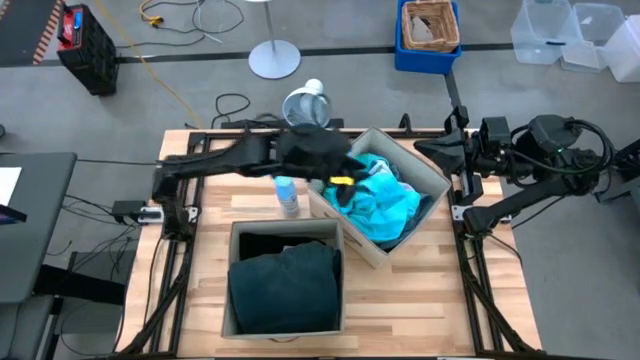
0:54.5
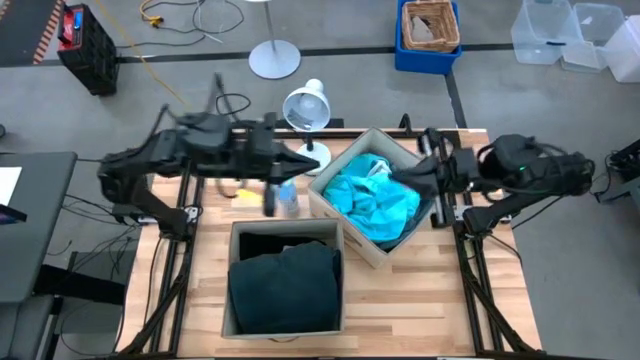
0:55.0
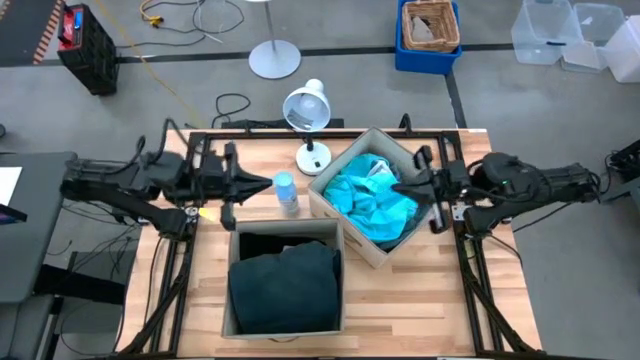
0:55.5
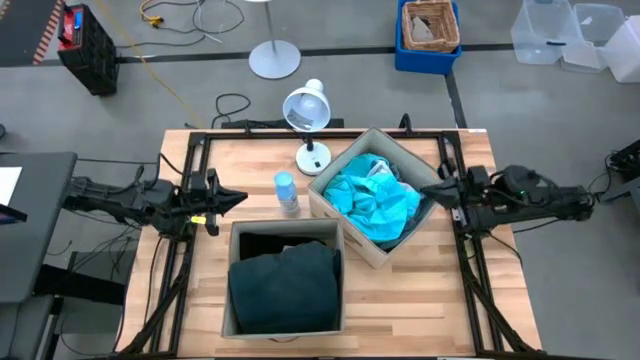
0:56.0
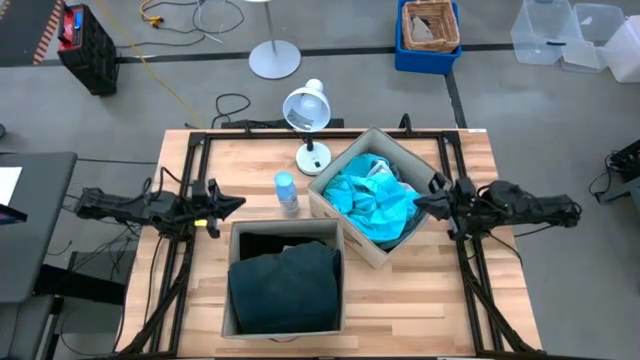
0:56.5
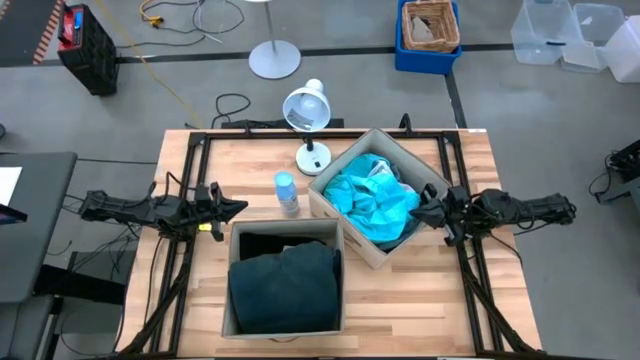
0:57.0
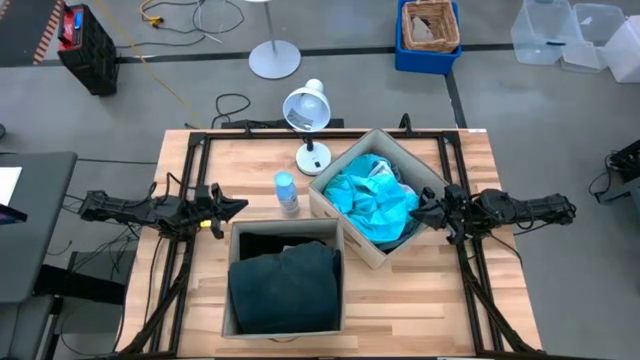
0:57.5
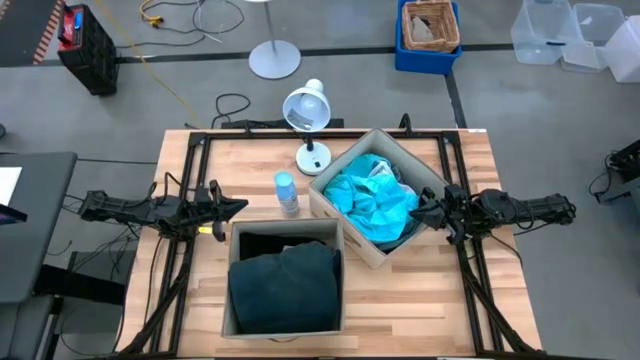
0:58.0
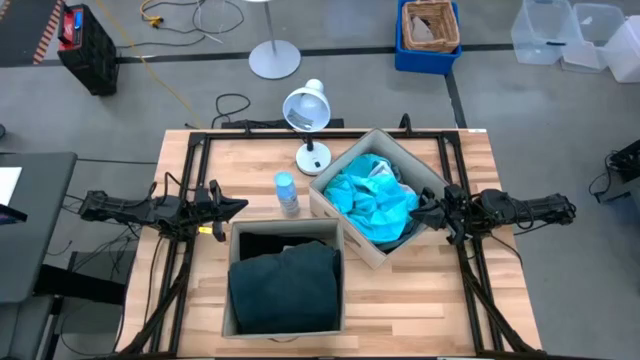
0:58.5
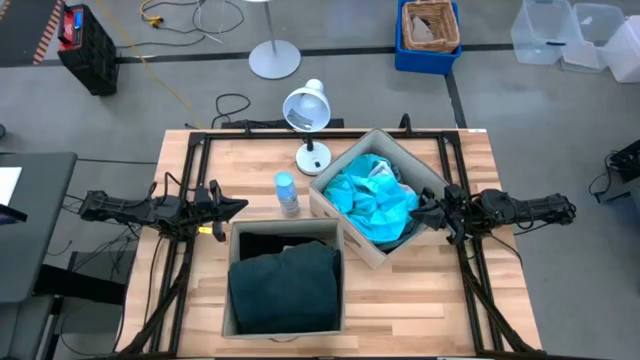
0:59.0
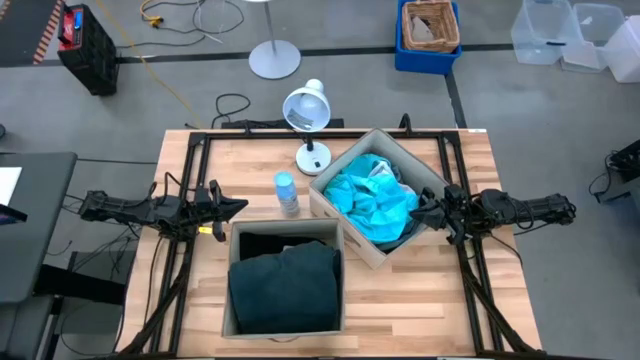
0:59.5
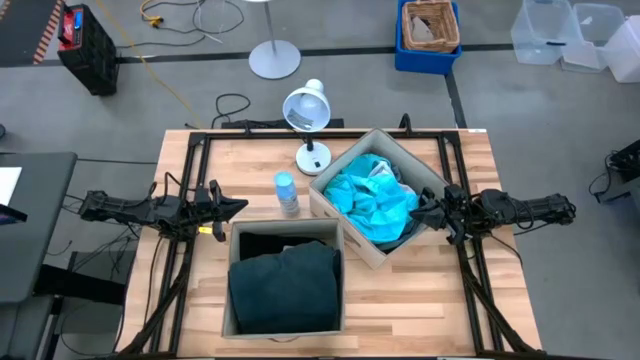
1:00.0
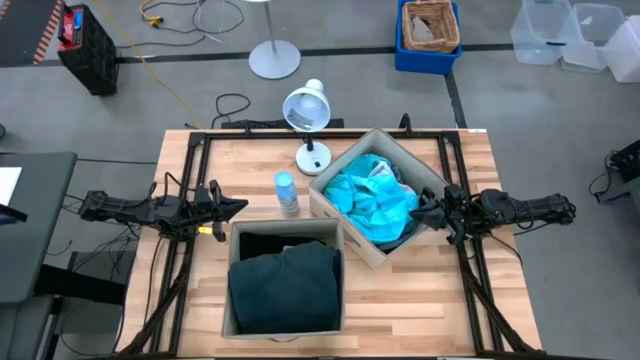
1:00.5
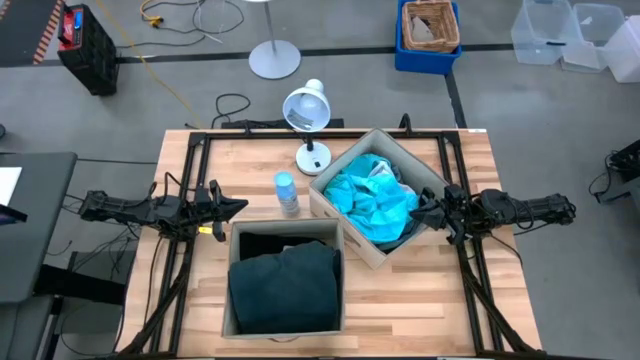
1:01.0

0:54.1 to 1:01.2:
Task: Sort clothes
Return to Home Position

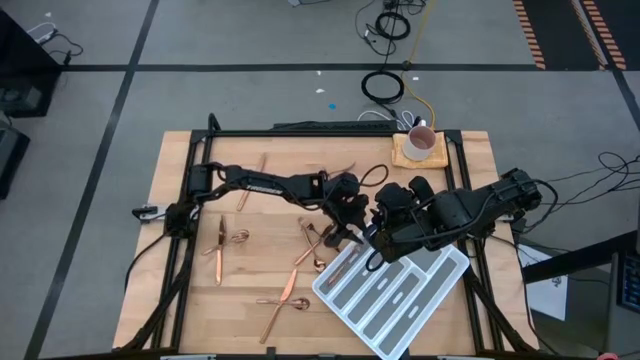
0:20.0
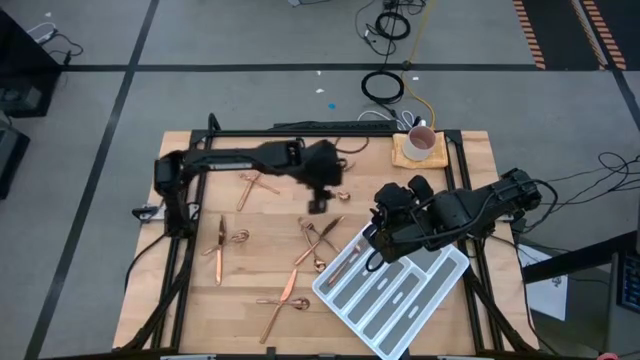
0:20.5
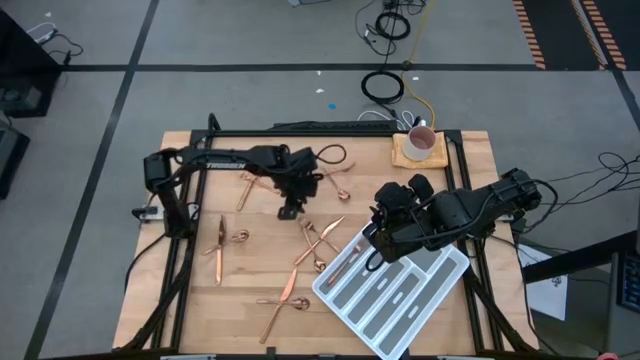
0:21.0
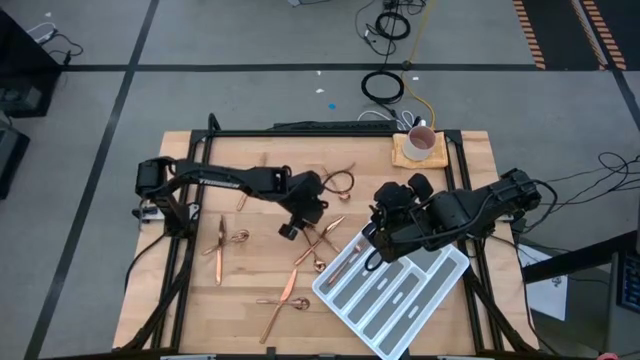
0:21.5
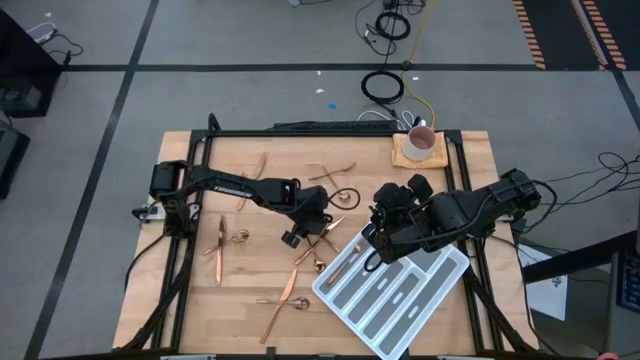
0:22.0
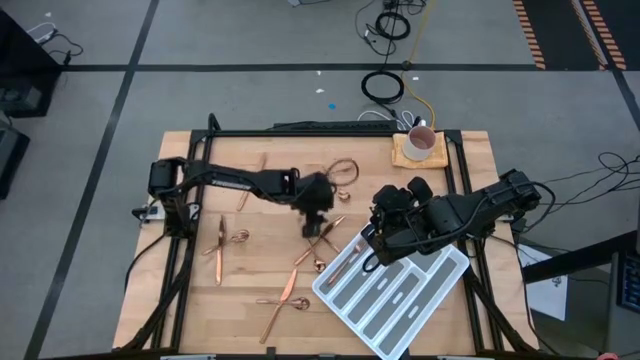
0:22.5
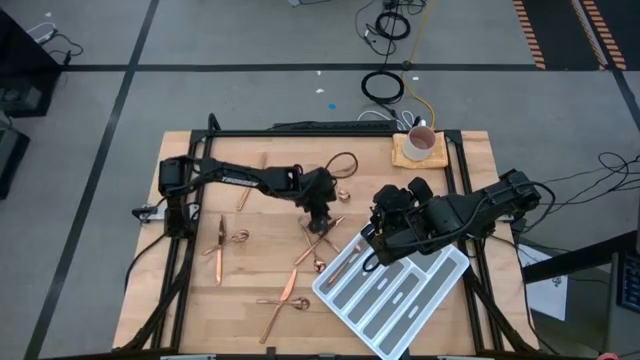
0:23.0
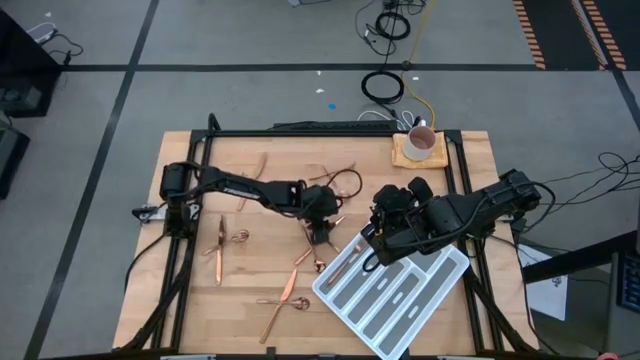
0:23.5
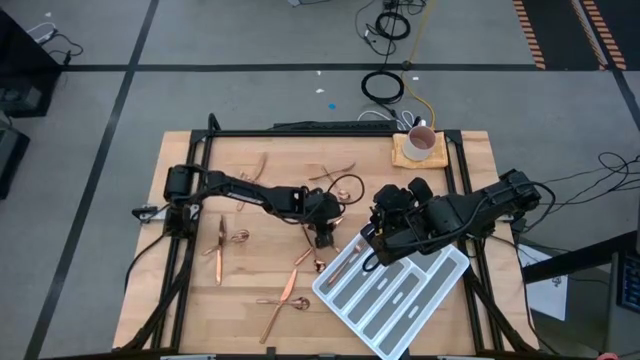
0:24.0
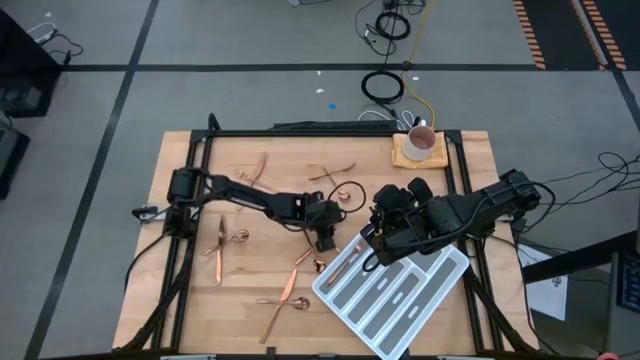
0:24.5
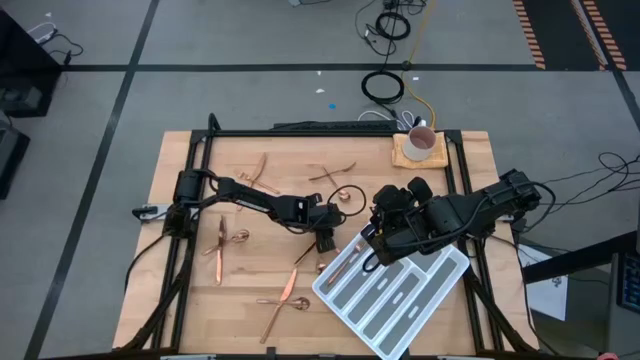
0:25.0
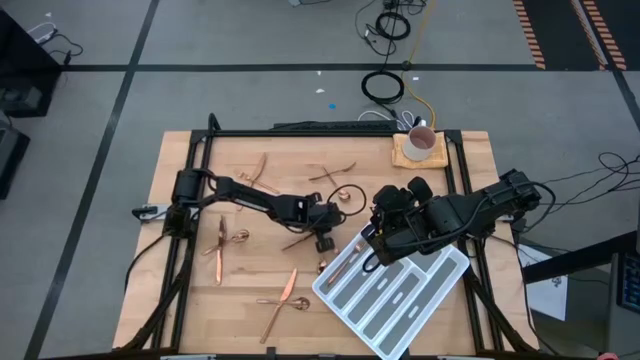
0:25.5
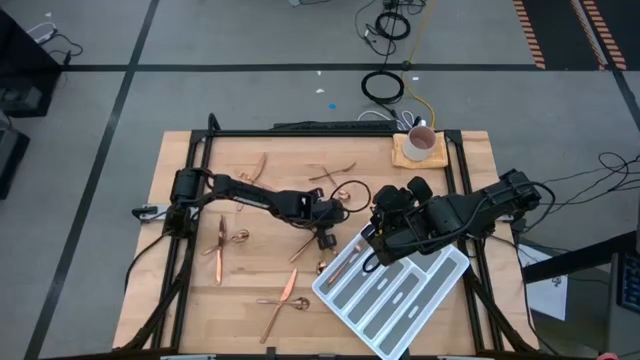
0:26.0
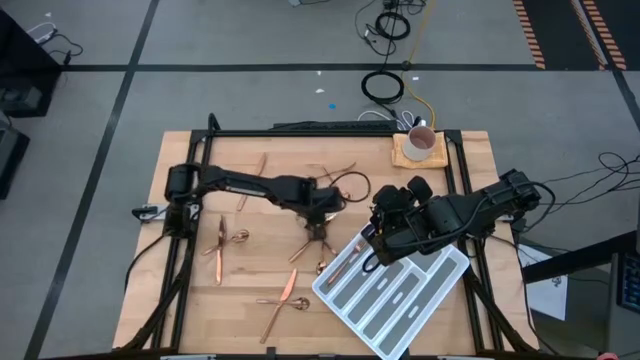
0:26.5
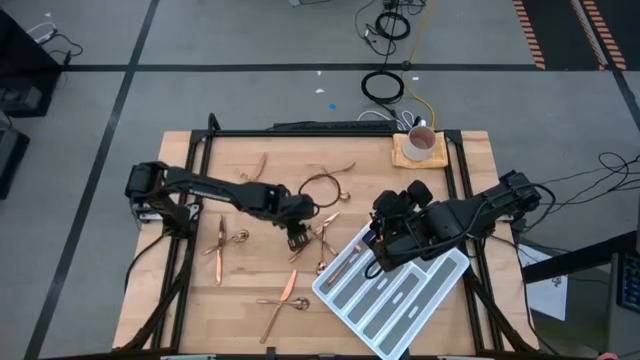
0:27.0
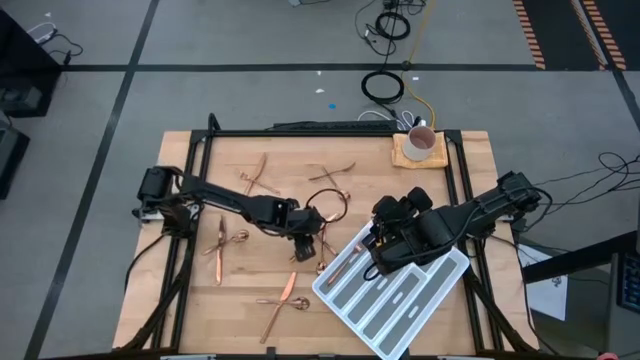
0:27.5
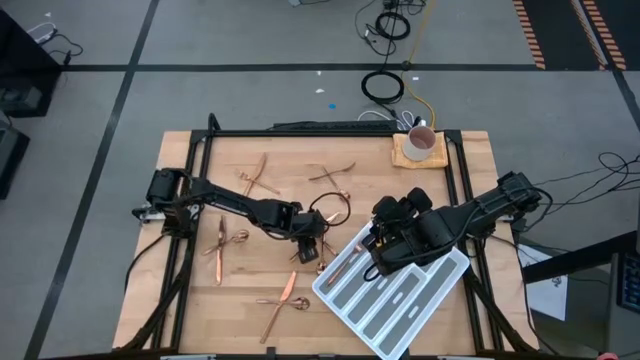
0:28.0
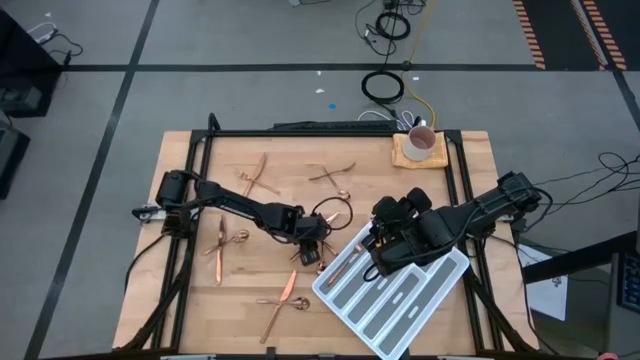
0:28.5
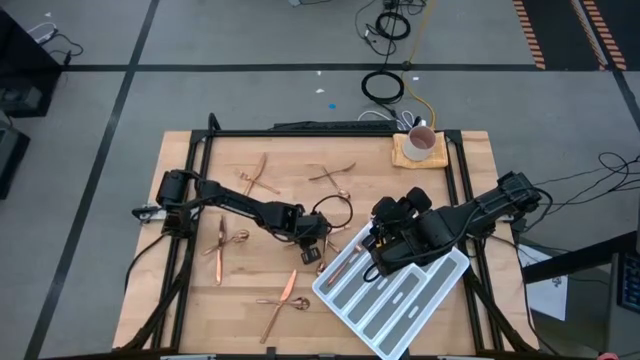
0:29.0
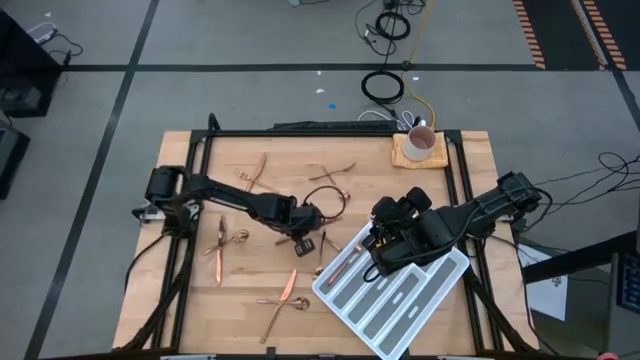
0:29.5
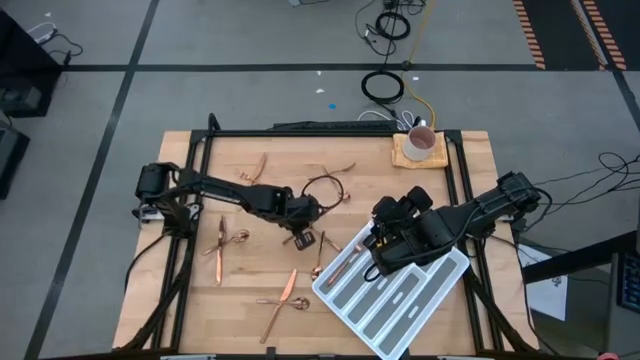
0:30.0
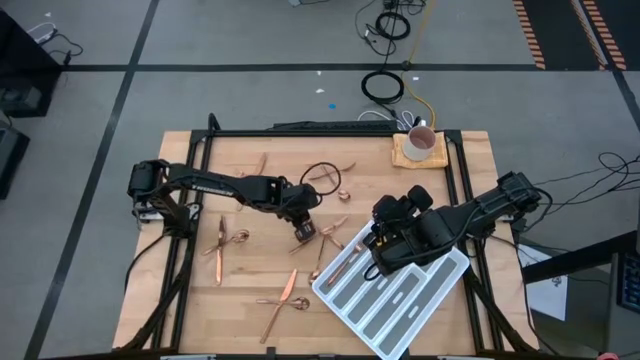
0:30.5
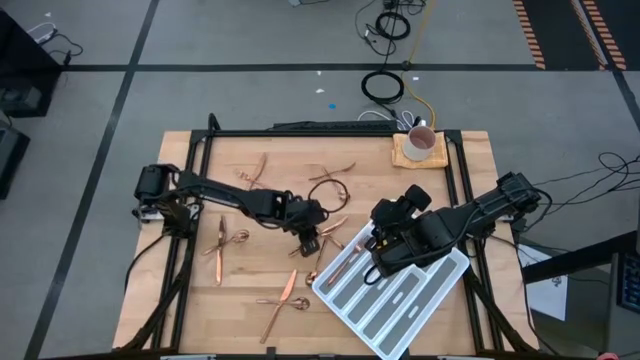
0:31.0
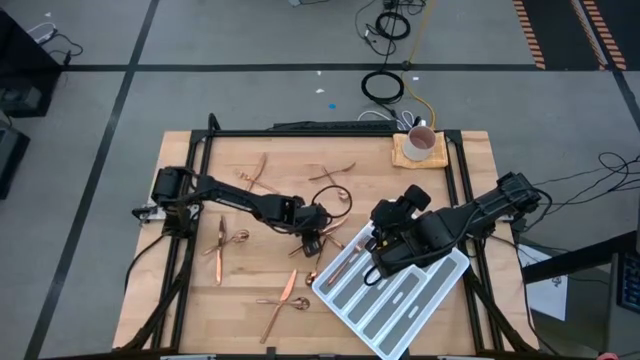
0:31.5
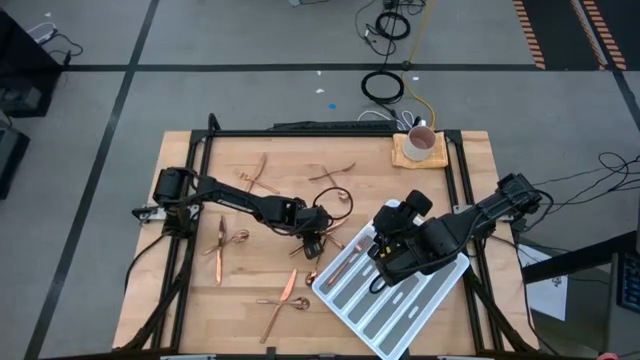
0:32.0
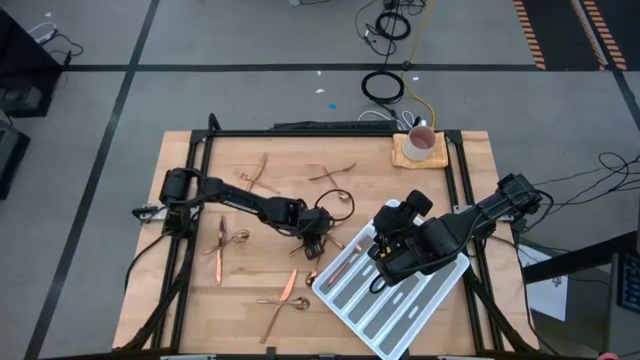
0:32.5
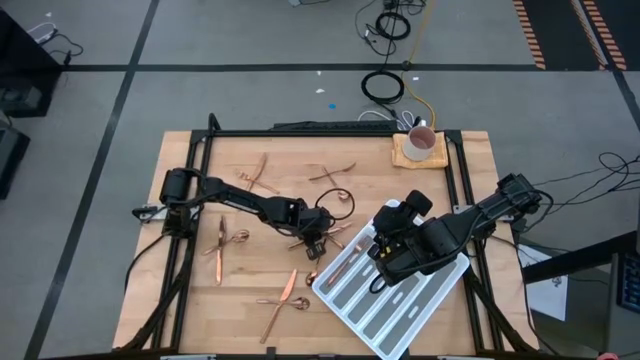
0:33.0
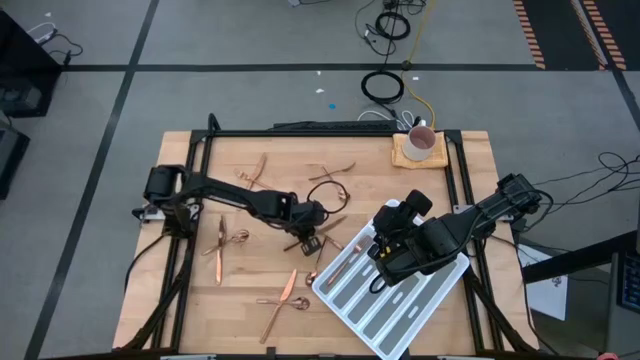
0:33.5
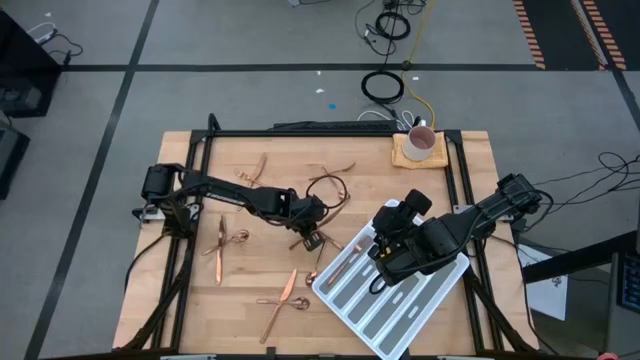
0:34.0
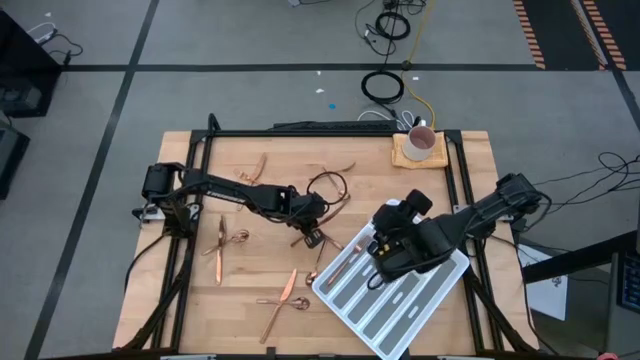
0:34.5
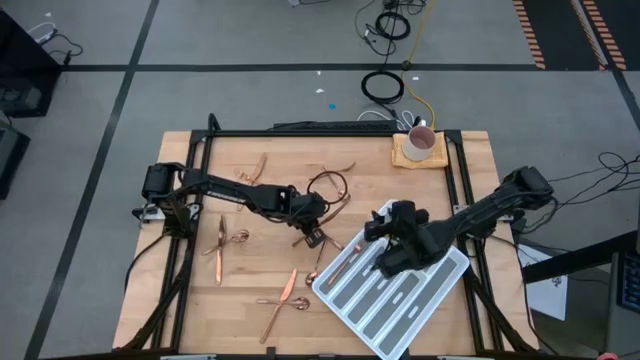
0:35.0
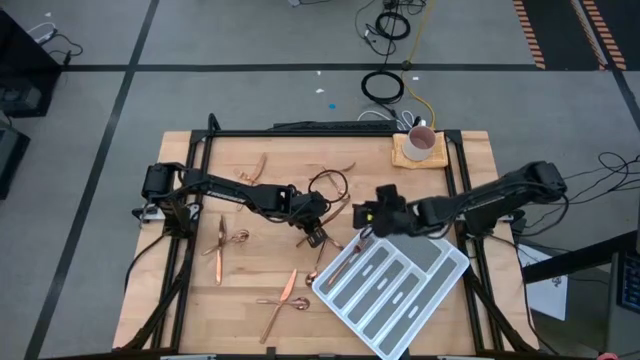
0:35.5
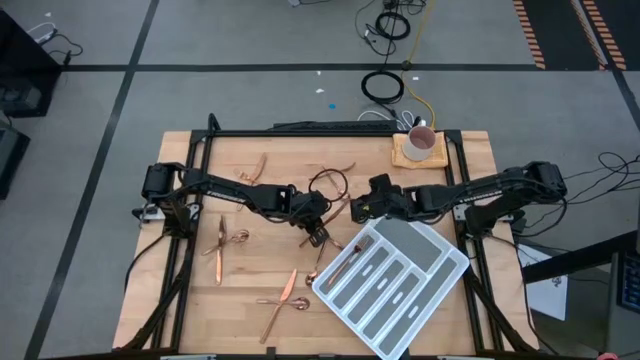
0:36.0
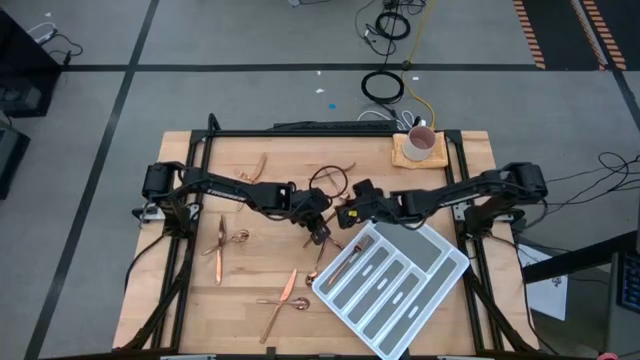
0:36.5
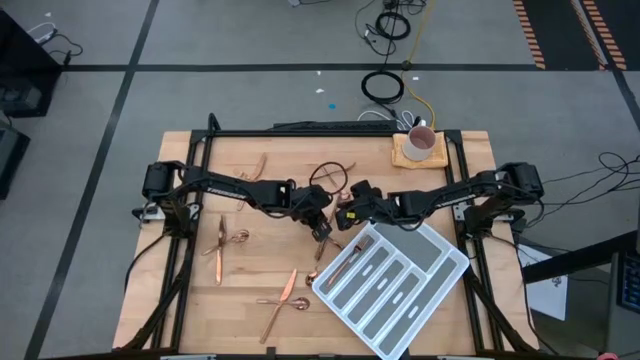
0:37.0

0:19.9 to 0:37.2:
Task: Sort silverware
Put the gold knife into the silverware tray
